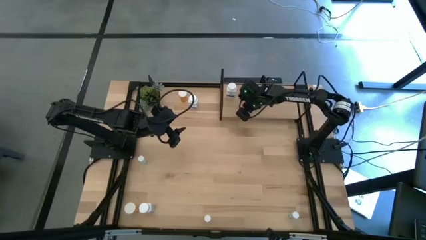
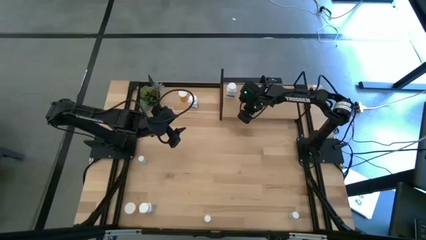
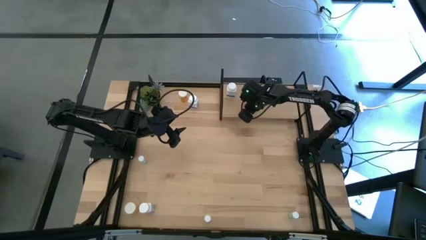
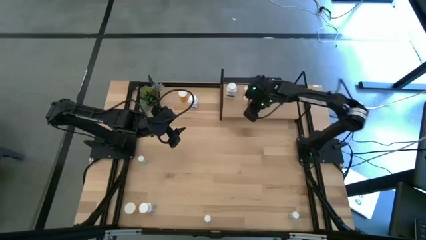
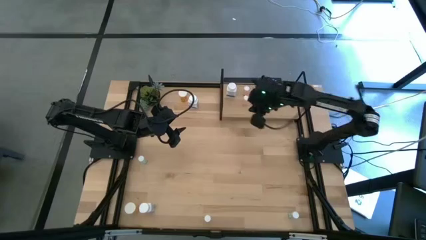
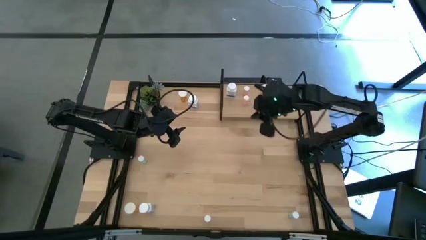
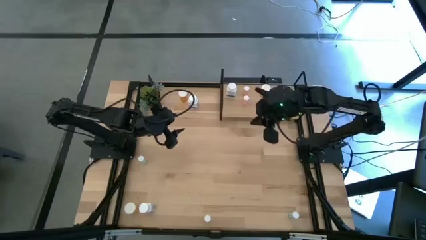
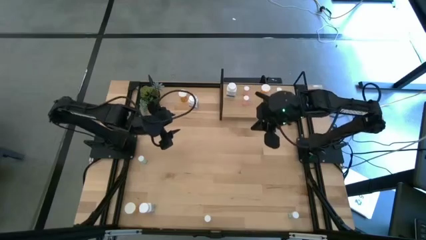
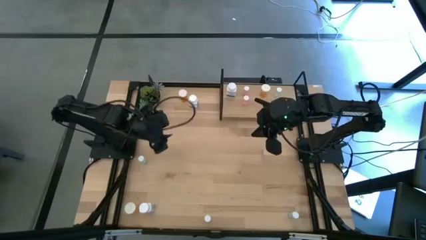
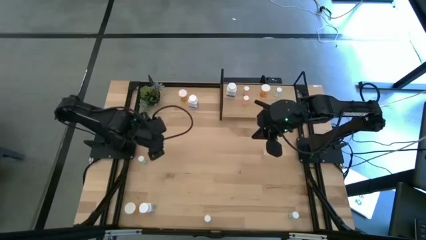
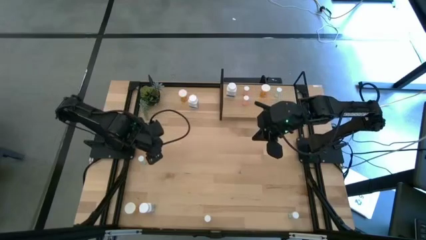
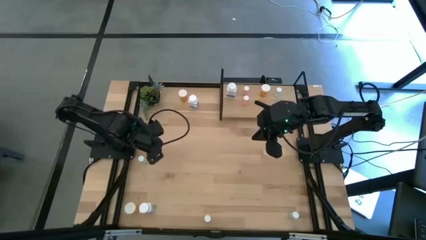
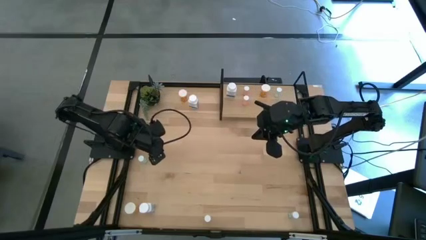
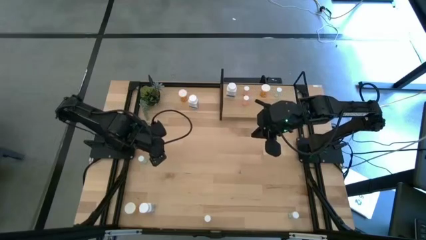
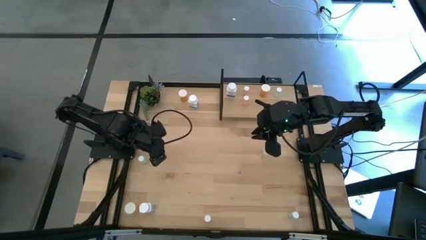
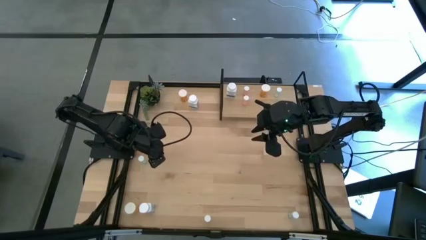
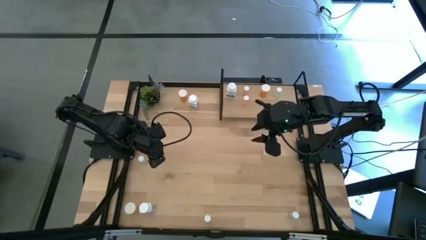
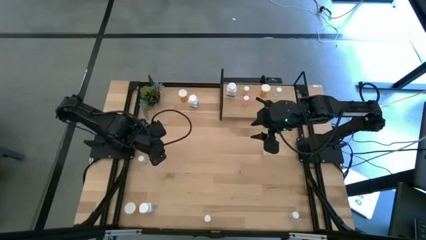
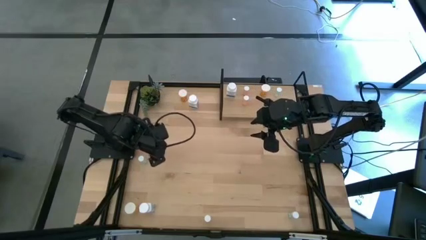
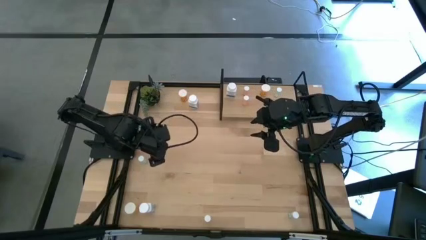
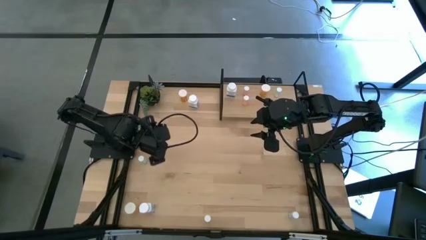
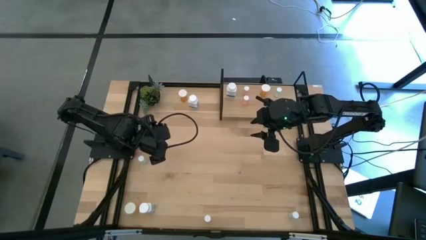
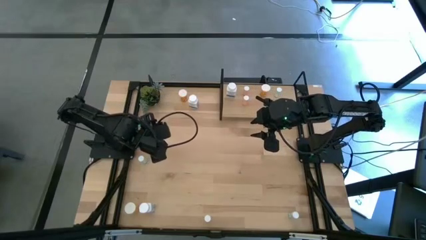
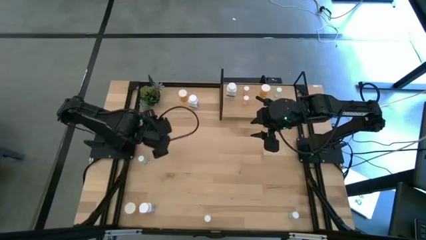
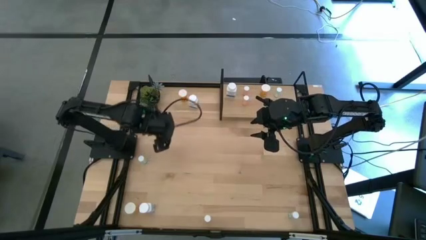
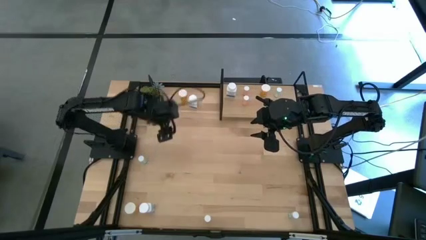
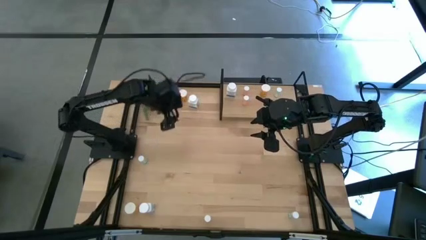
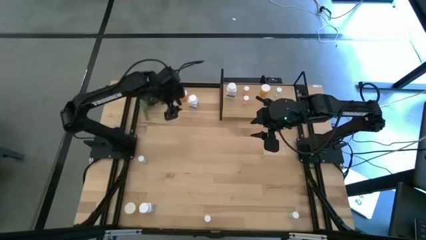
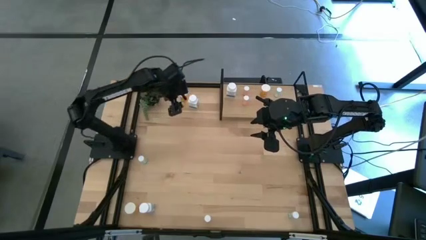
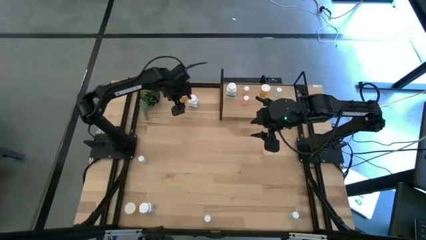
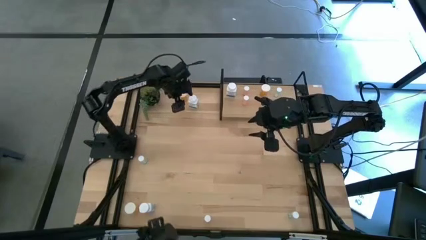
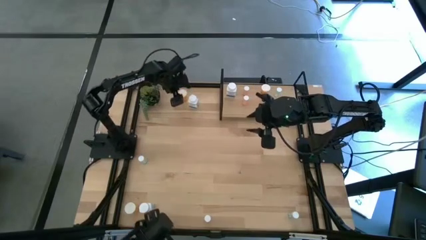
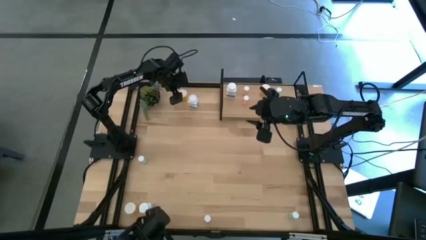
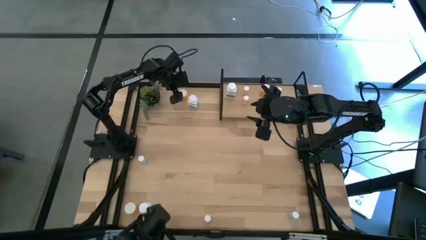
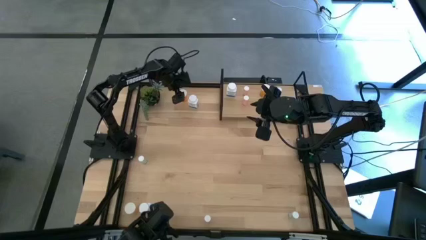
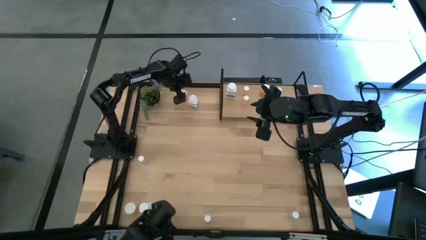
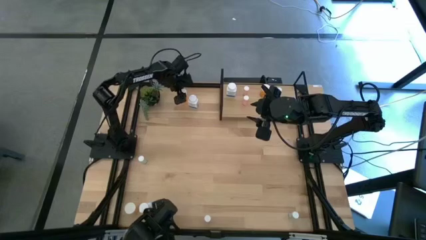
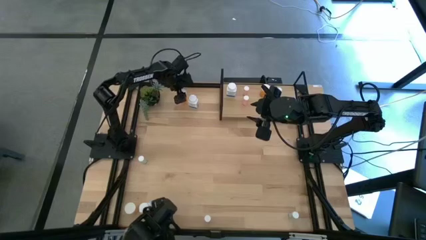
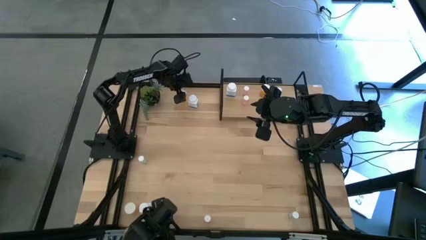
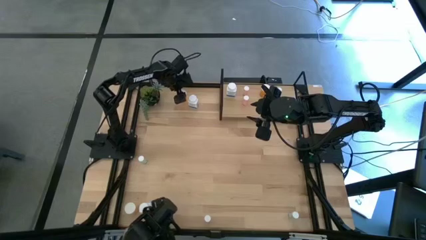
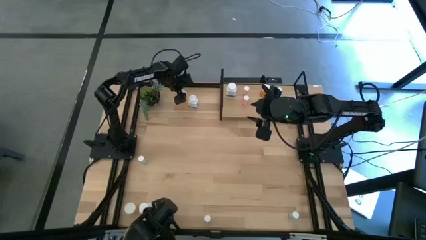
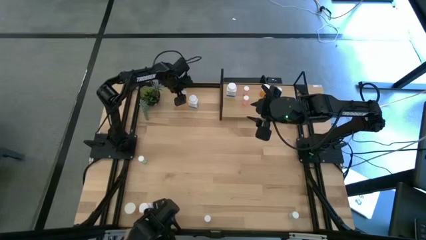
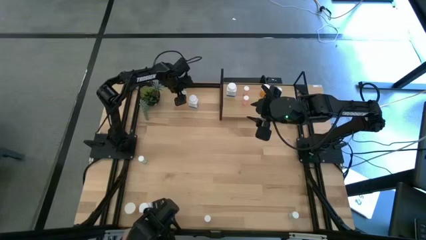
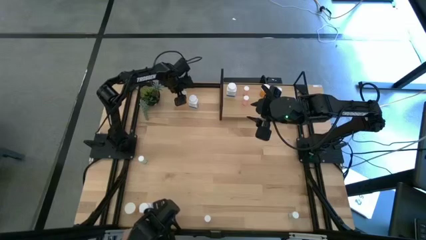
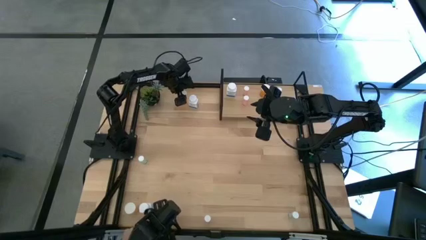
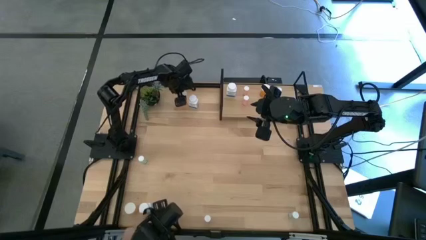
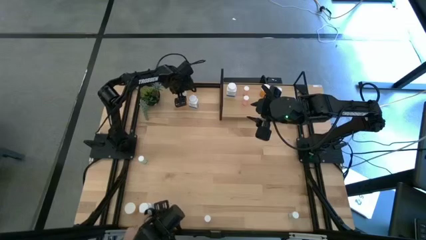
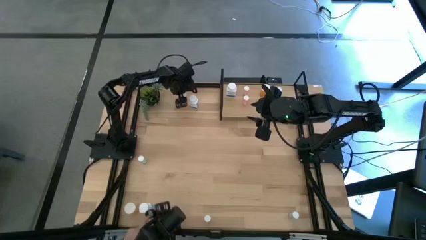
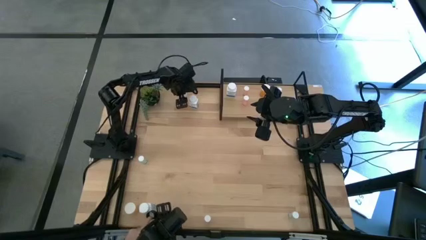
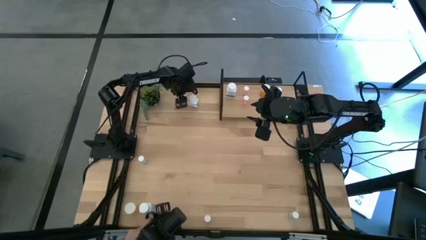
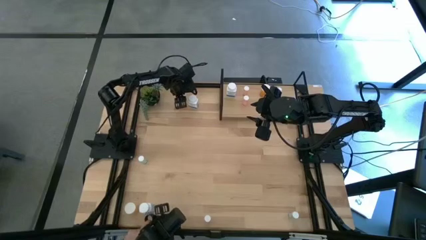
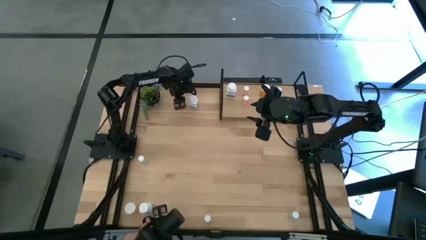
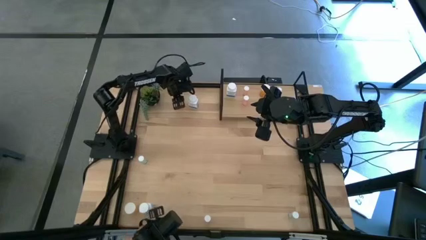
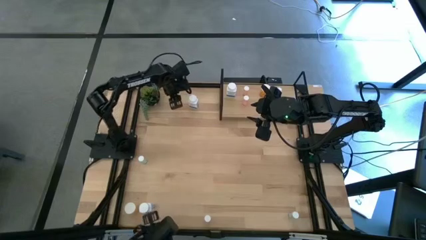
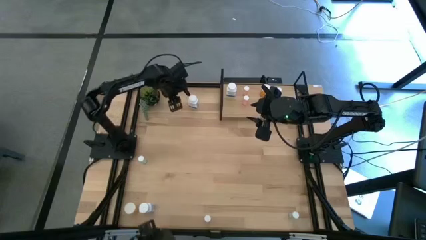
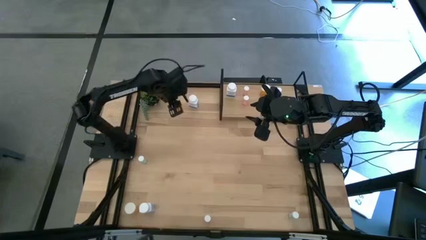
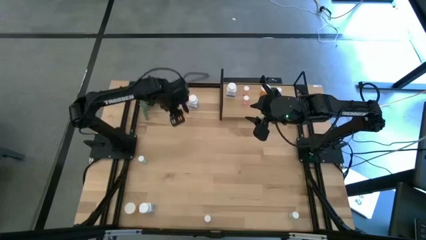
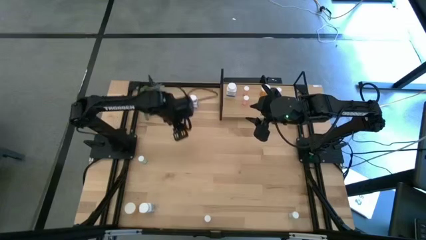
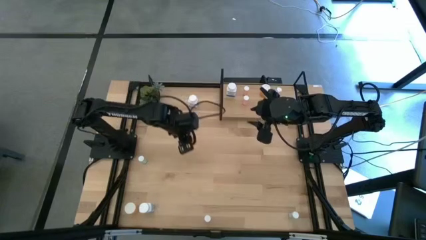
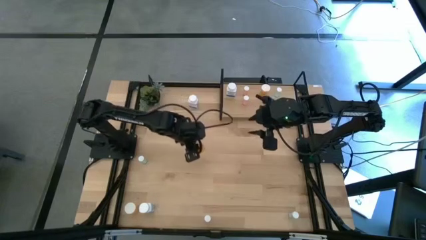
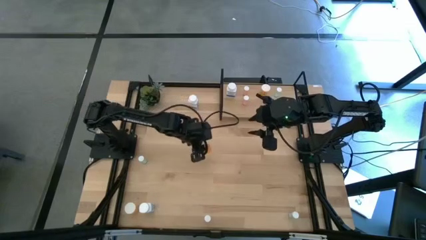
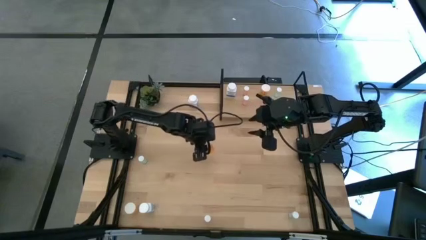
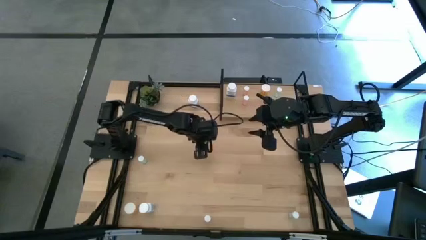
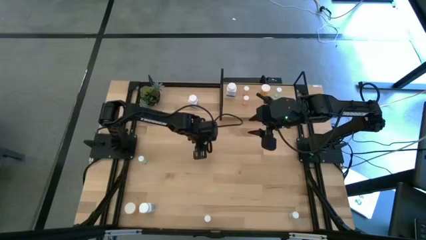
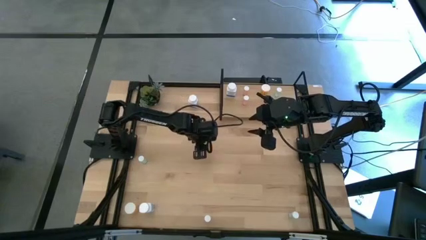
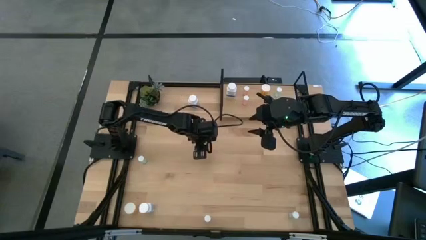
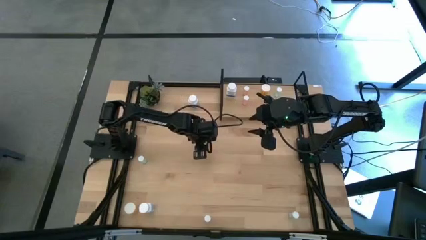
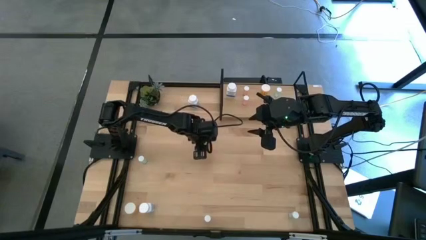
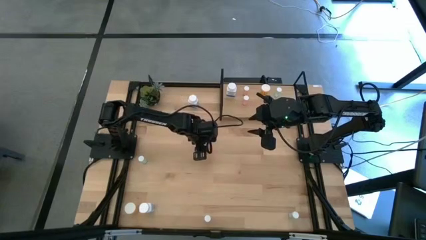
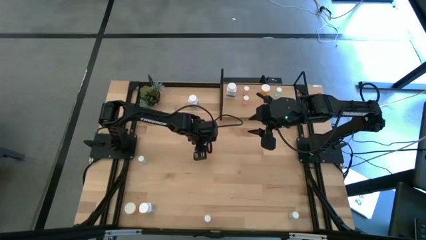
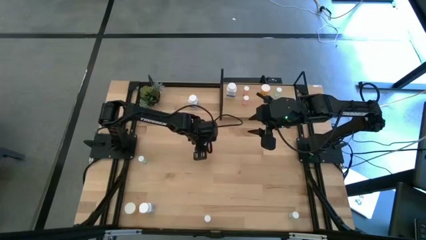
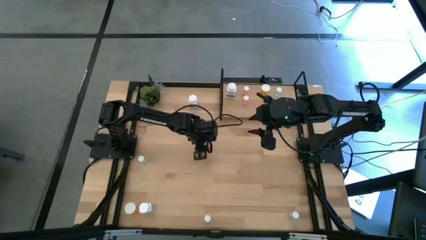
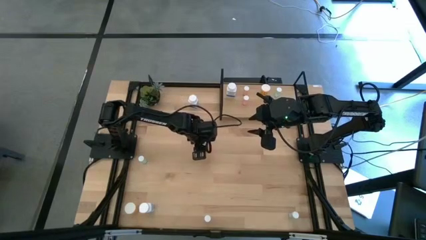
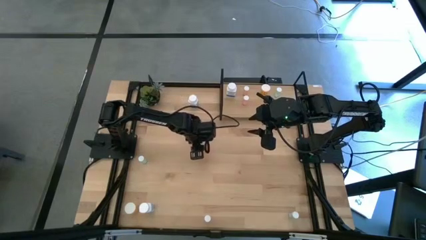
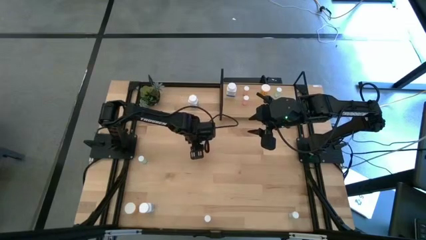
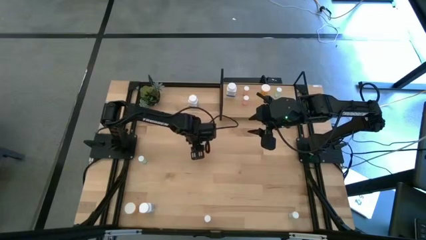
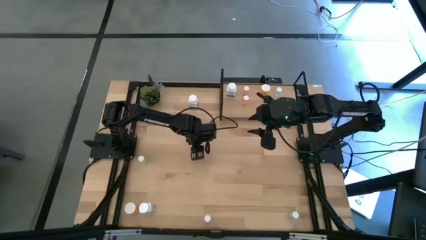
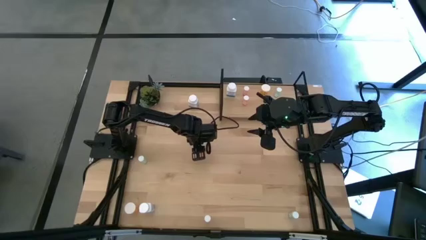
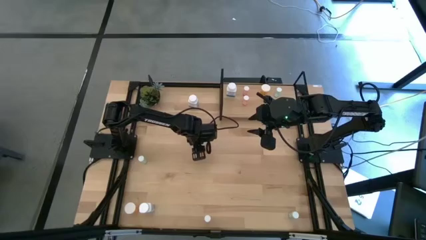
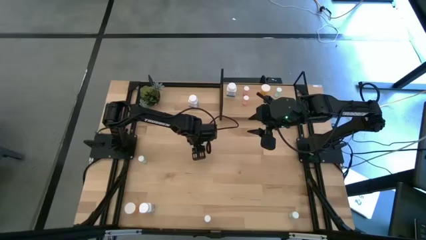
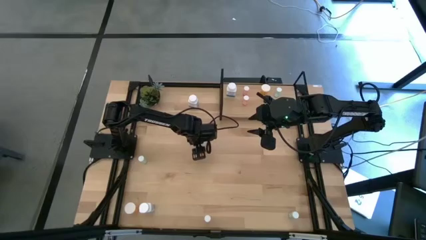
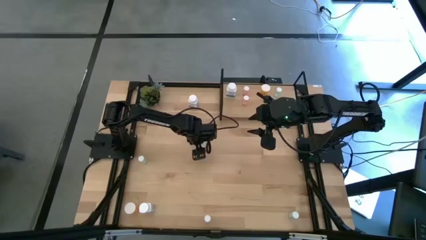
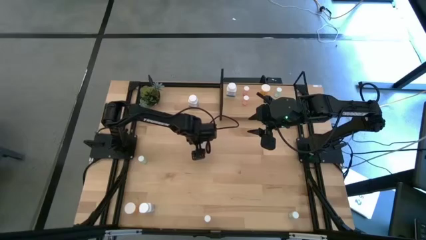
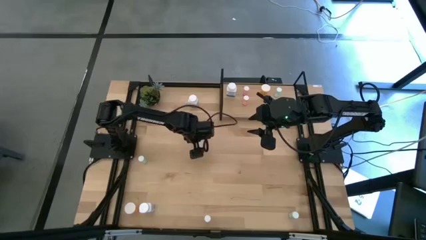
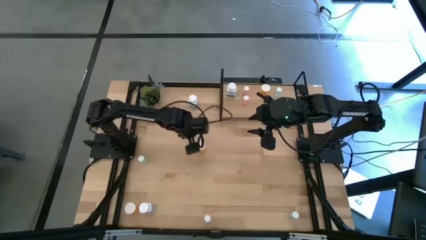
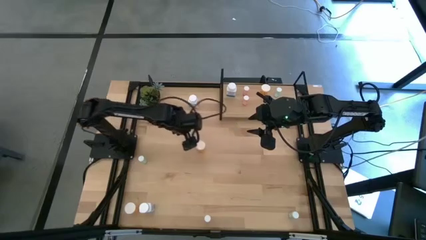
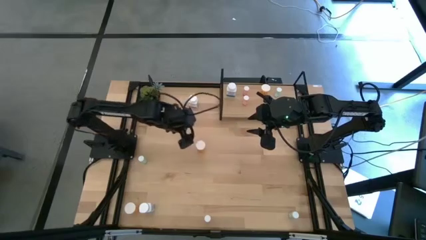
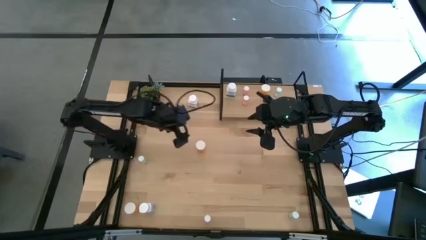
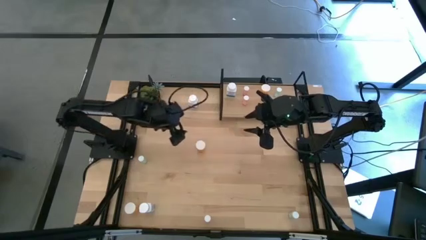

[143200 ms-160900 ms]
Task: Pick and place medicine bottles onto shelf by color
Put the top left orange pill bottle on the shelf
